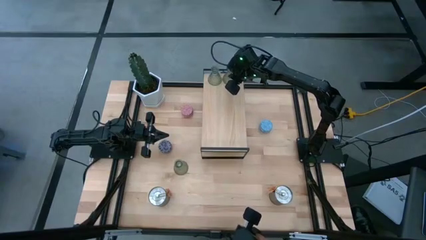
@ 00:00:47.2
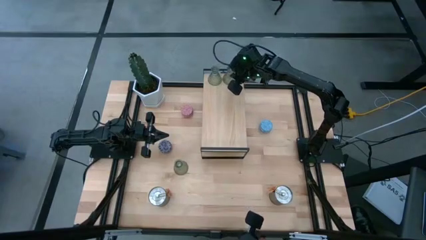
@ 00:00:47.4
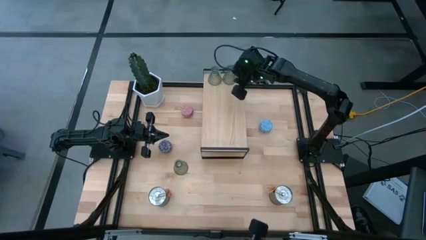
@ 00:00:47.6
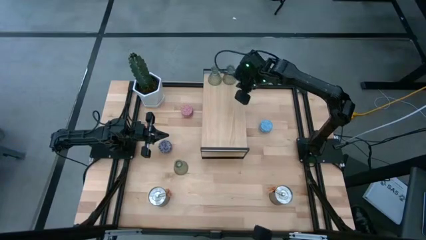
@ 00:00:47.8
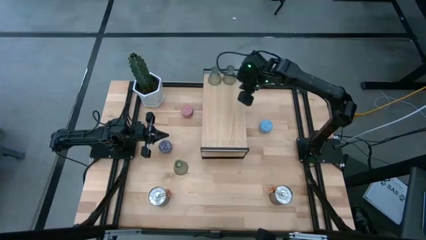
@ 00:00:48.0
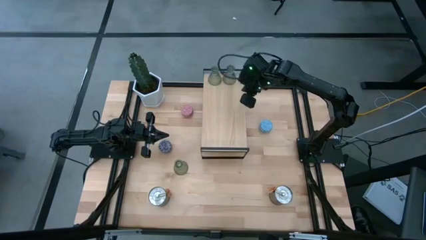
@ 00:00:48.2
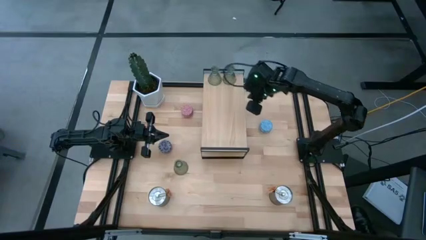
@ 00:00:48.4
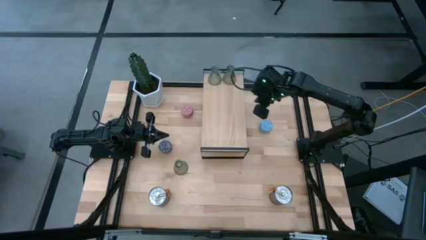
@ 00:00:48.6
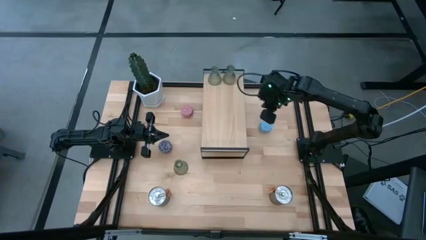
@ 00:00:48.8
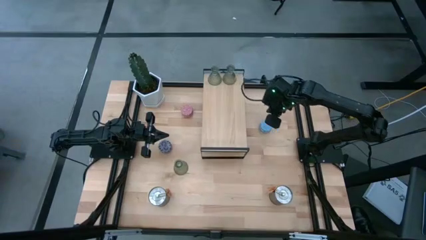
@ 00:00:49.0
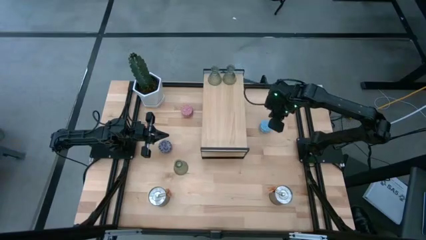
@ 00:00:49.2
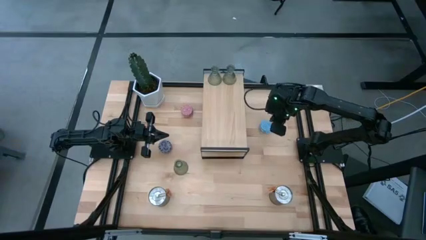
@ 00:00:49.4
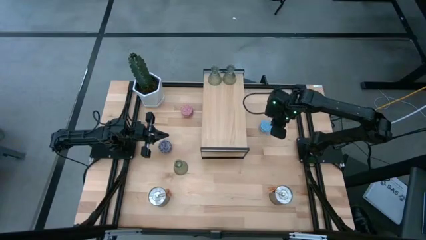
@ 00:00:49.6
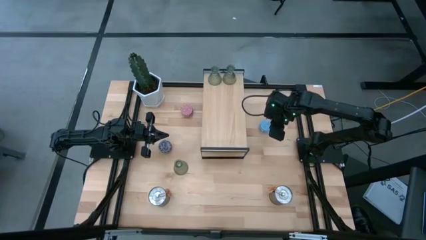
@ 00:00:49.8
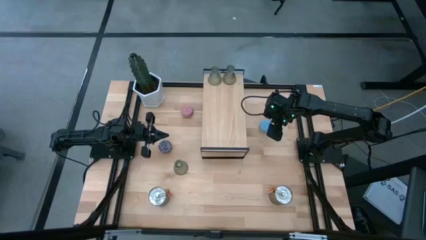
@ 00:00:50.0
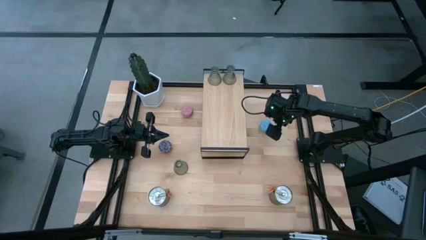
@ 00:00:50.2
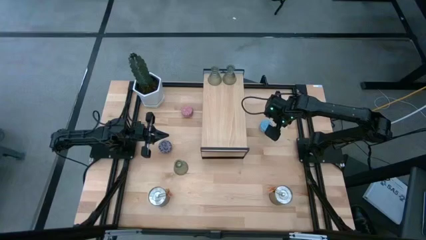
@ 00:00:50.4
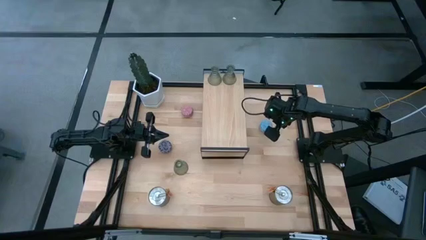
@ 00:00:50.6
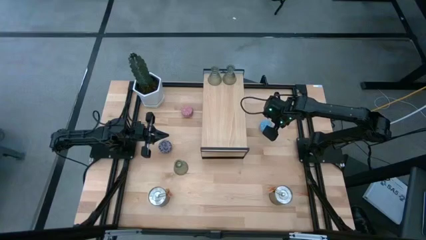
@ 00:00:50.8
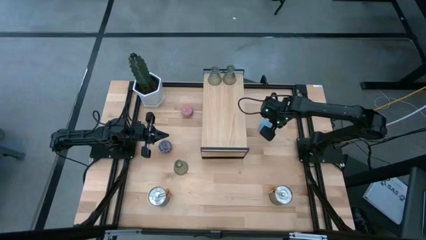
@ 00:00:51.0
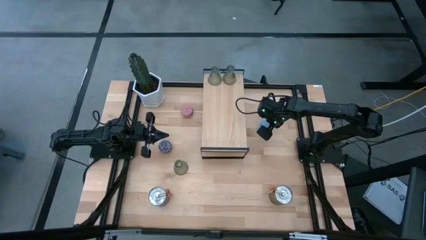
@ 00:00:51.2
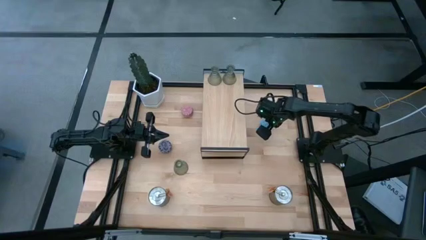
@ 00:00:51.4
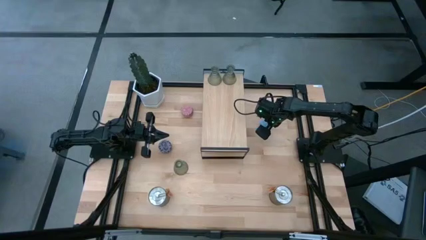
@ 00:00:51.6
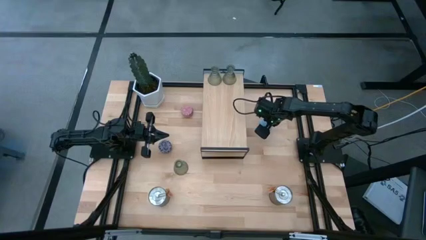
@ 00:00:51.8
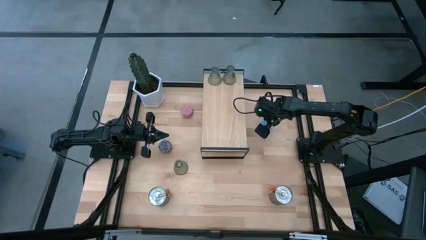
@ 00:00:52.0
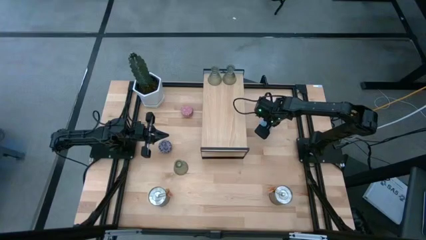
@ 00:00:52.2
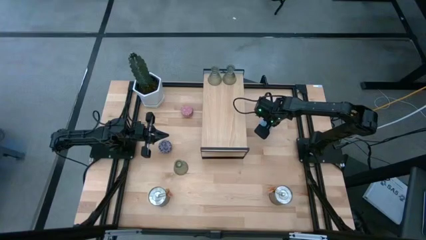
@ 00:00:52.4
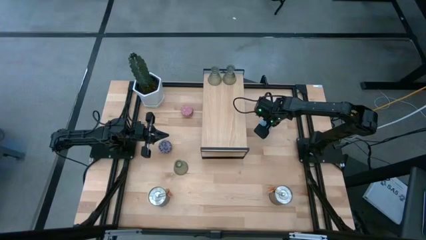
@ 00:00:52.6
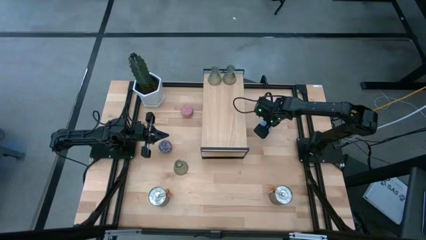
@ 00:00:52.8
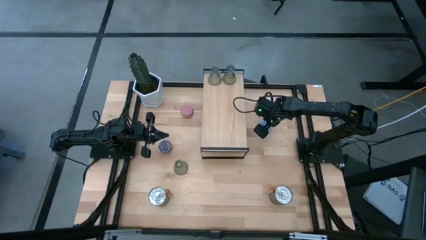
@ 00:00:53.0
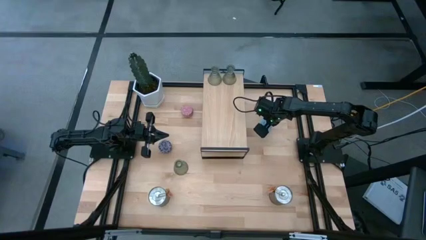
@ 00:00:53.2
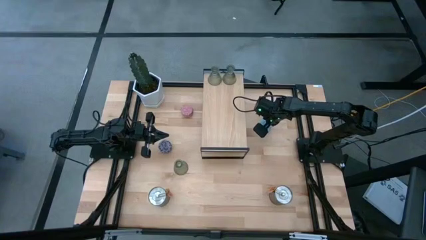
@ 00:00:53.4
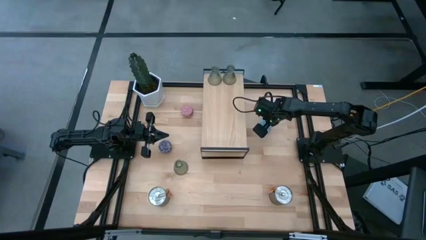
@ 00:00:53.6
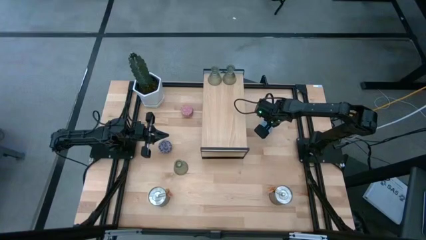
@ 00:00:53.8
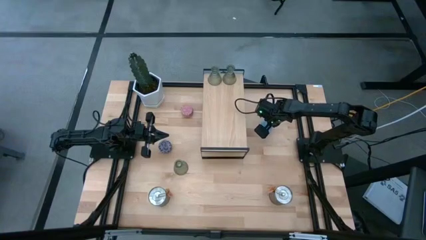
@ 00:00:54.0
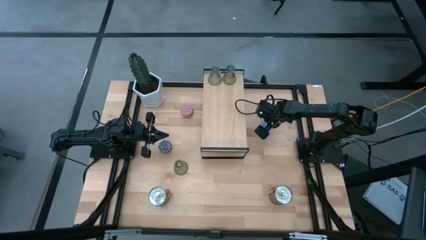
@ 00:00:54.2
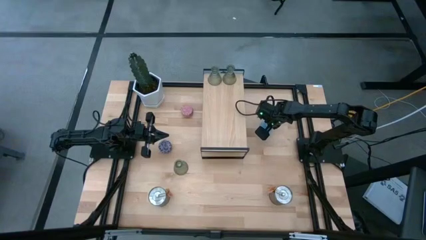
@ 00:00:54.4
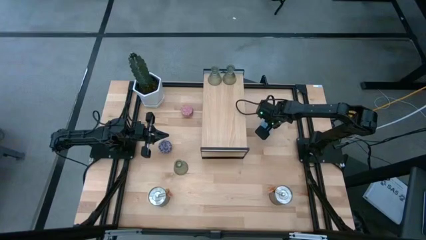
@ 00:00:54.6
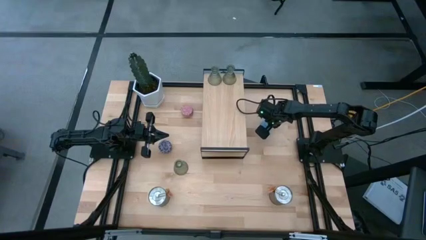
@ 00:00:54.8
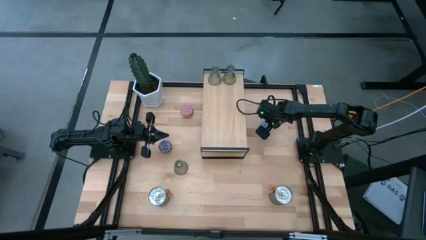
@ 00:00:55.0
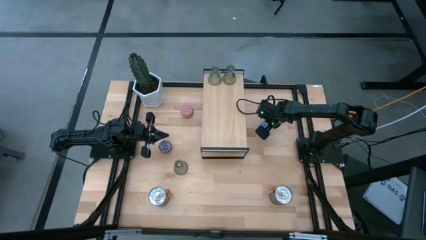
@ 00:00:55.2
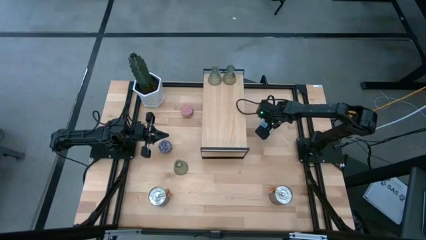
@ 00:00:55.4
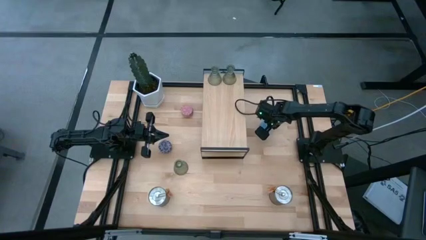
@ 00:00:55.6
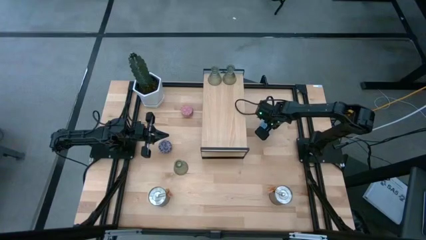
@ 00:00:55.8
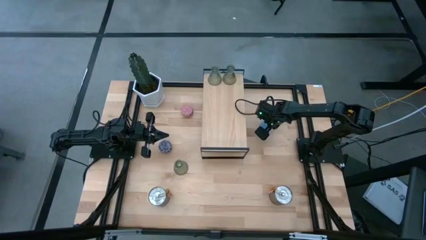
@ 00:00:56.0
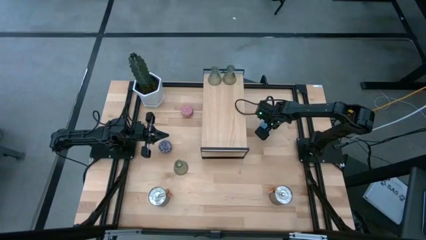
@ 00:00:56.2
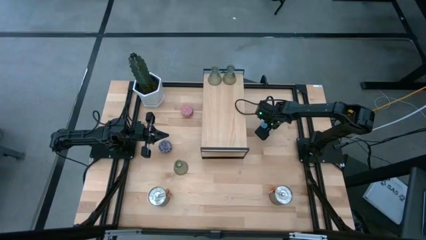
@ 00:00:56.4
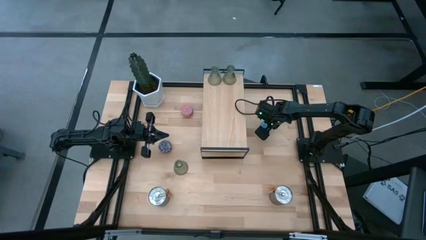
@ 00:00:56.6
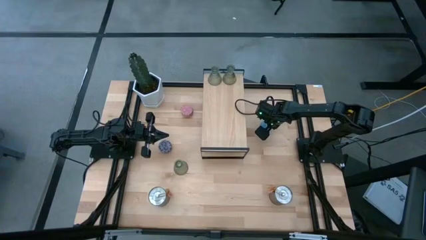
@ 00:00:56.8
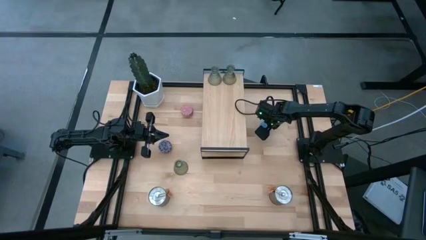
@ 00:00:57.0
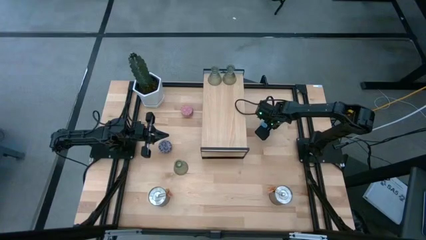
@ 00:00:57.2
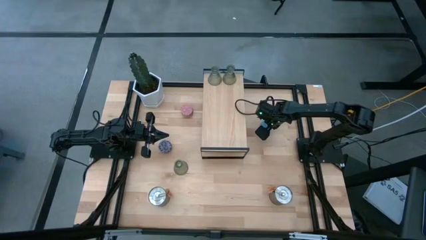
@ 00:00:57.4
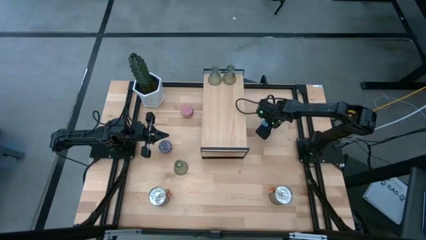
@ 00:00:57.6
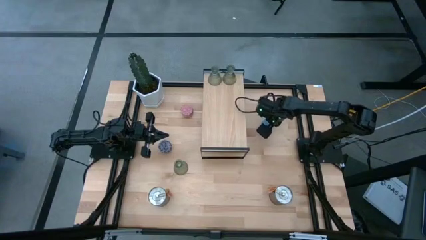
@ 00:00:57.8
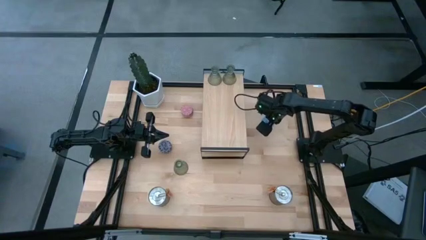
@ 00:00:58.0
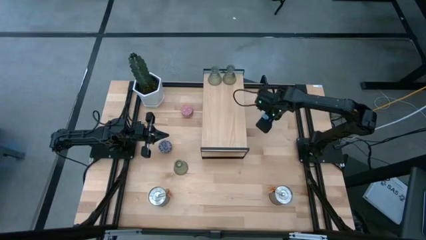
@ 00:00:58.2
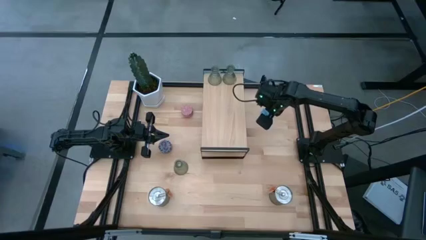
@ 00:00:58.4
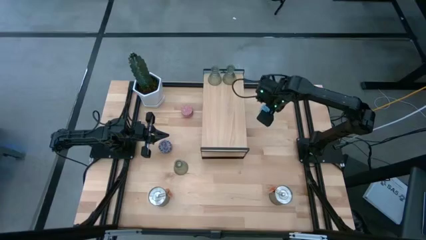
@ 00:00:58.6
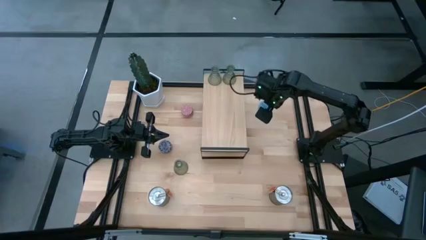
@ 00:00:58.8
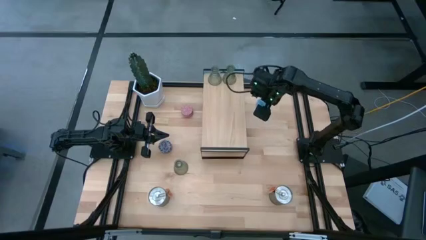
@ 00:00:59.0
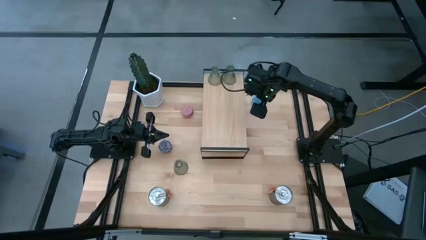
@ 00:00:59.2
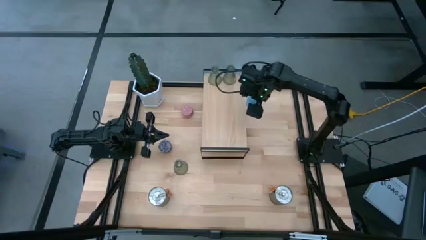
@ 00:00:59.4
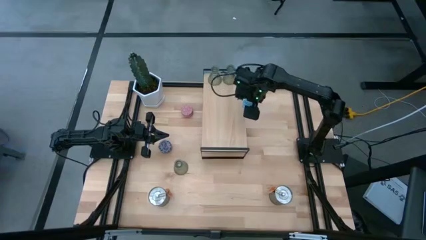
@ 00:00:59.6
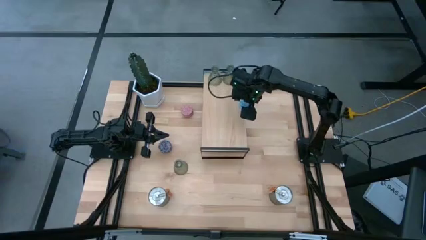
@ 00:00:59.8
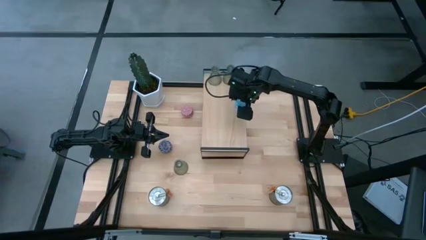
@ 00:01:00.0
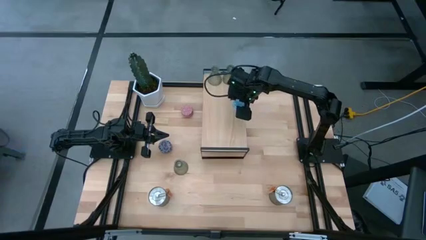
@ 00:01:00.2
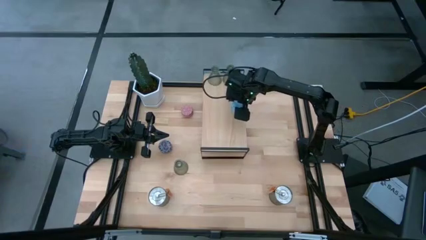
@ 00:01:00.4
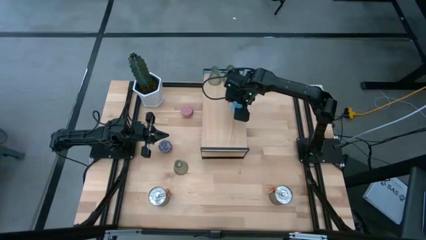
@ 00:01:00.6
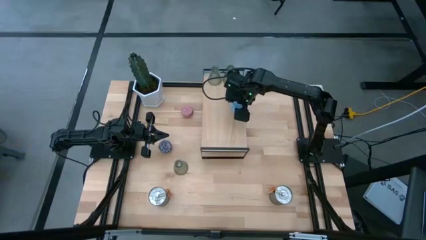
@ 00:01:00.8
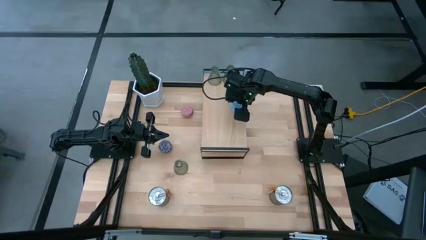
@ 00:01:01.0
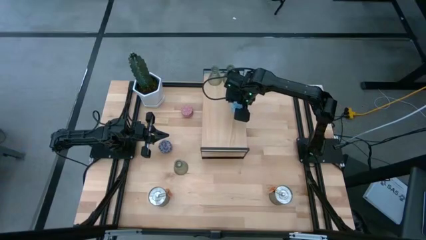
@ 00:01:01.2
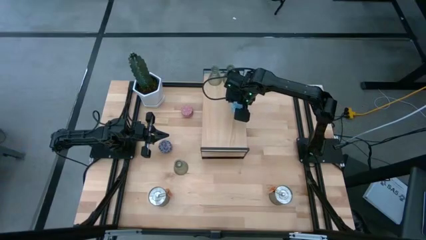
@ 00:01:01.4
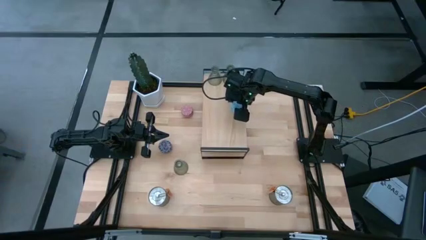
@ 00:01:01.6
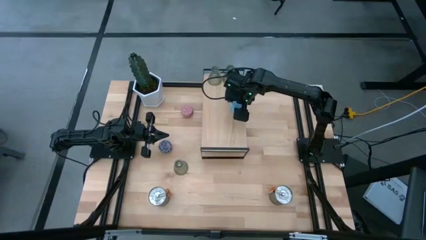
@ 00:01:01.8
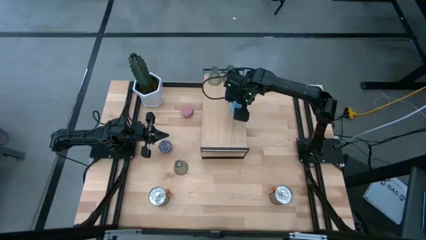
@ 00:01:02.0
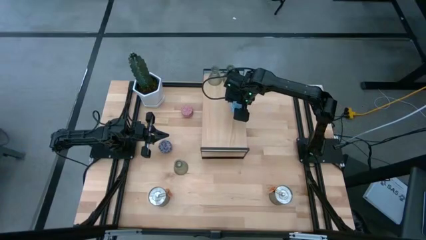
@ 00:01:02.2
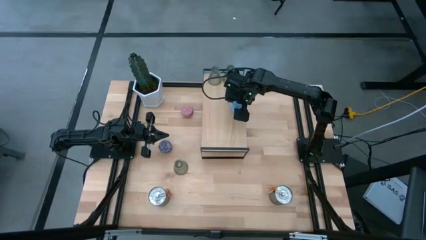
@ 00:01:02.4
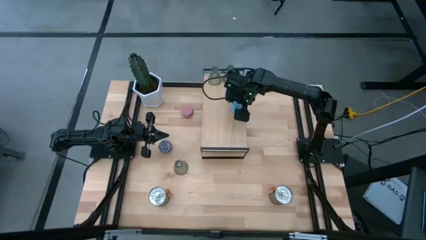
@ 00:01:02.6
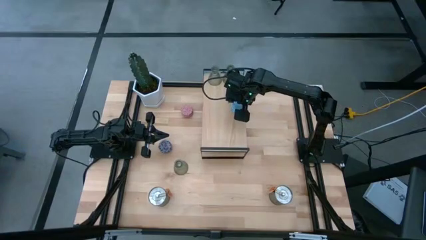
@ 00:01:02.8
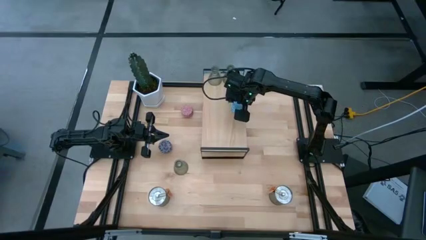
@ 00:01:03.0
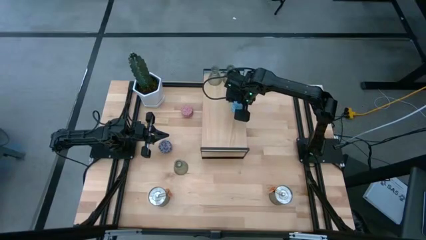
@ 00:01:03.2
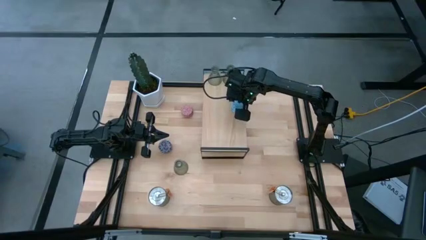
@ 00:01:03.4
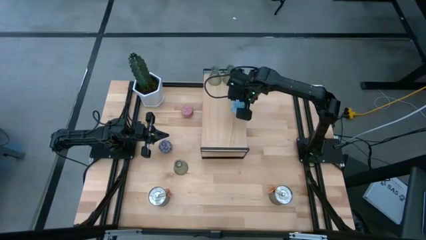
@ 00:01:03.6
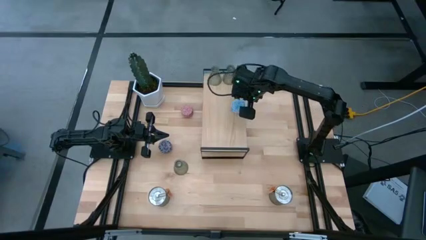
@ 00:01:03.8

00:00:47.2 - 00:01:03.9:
Task: Pick & Place candle stick holders
Put the blue scented candle on the shelf
